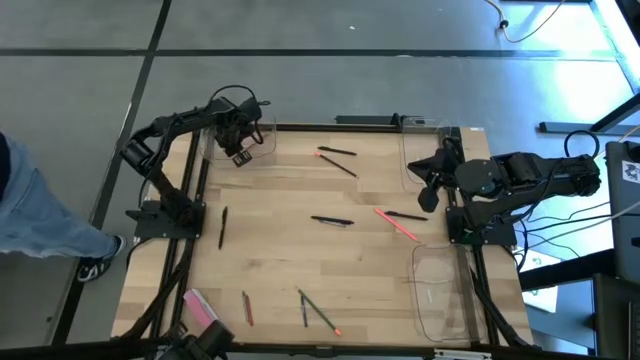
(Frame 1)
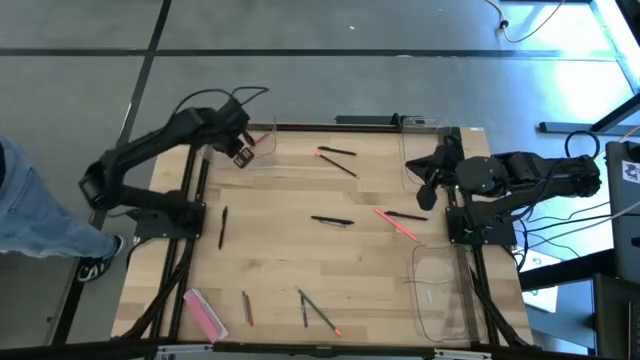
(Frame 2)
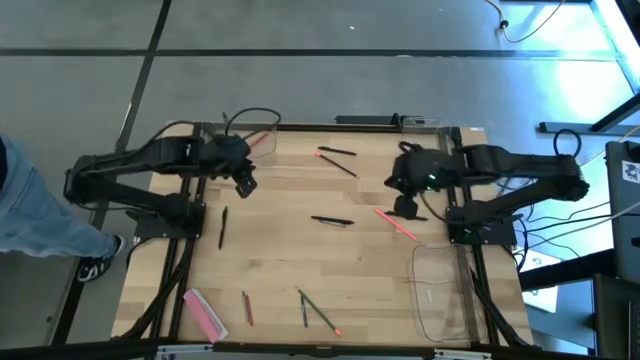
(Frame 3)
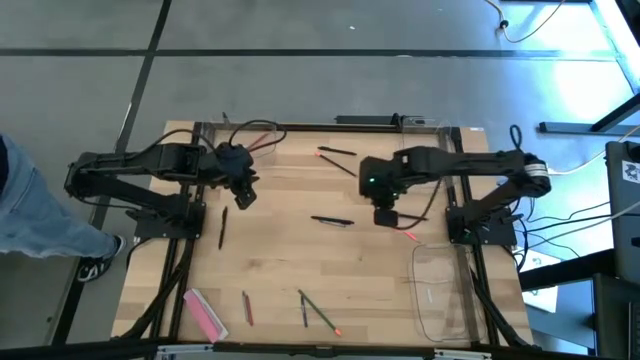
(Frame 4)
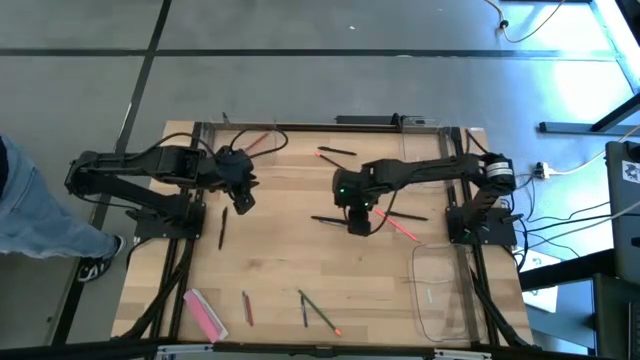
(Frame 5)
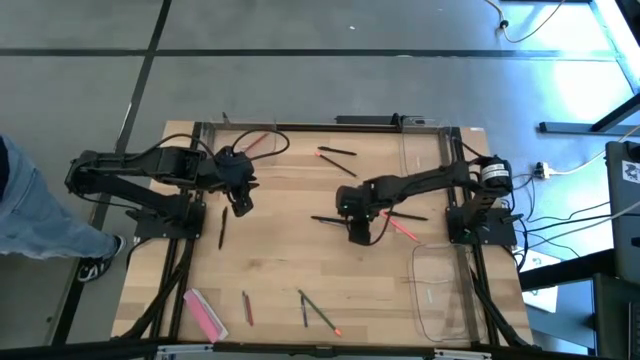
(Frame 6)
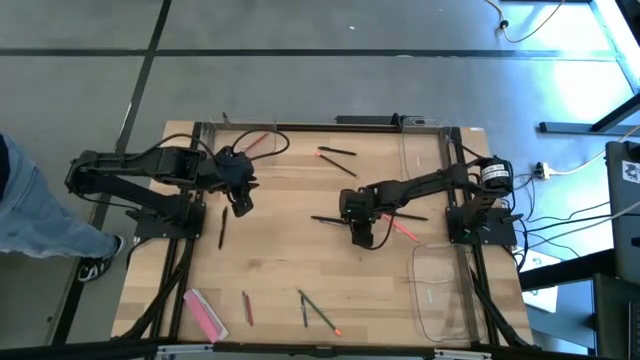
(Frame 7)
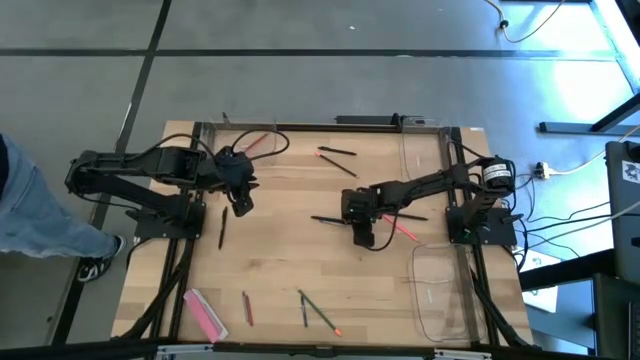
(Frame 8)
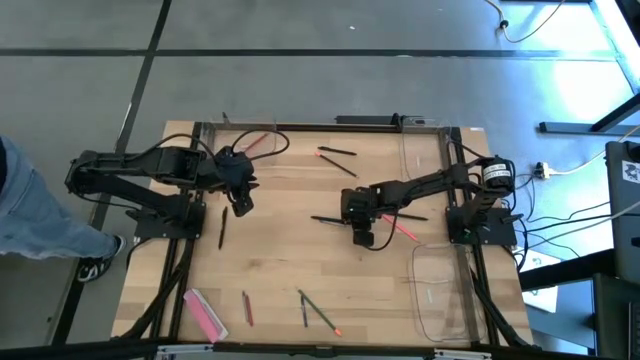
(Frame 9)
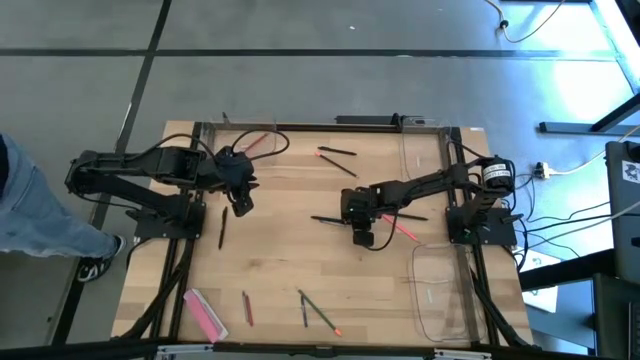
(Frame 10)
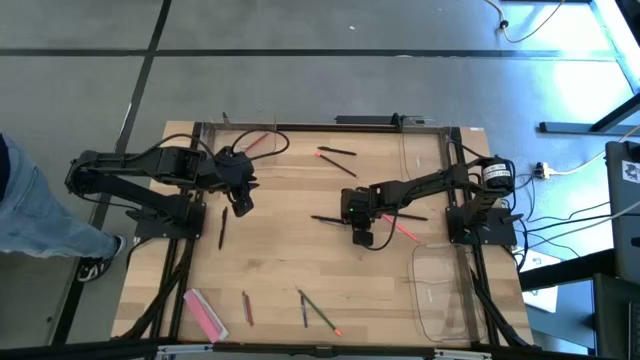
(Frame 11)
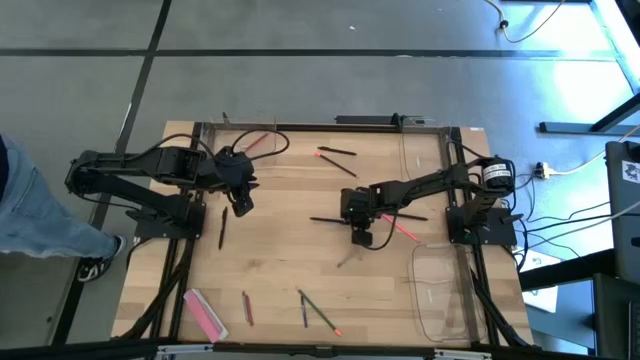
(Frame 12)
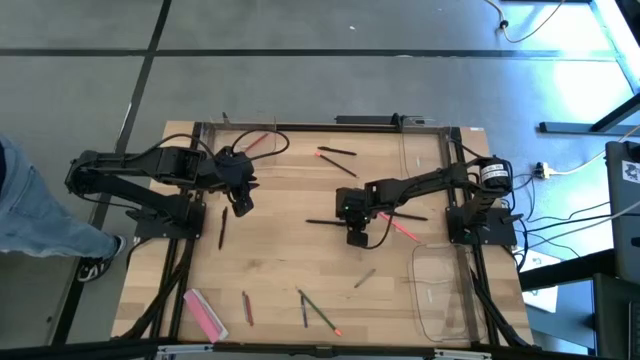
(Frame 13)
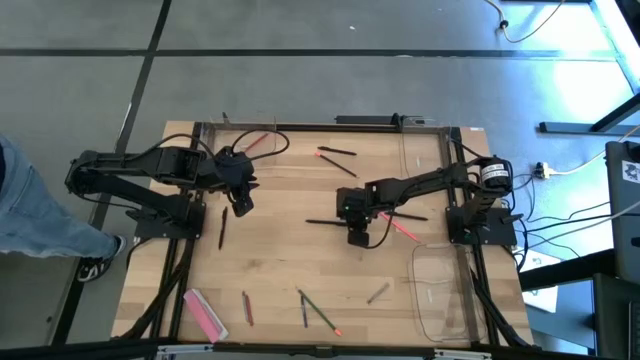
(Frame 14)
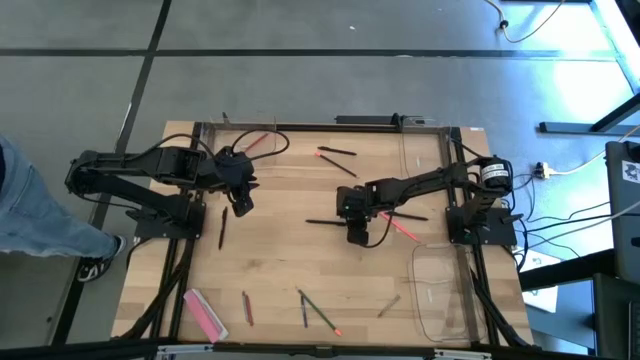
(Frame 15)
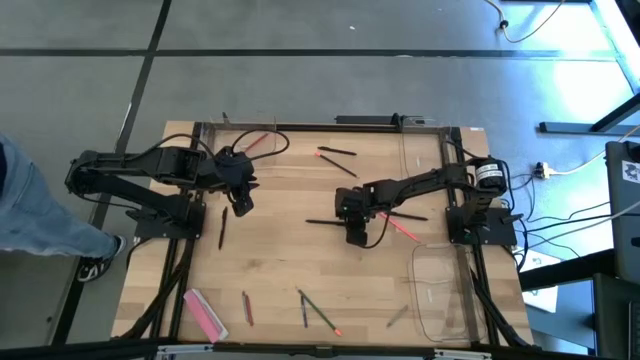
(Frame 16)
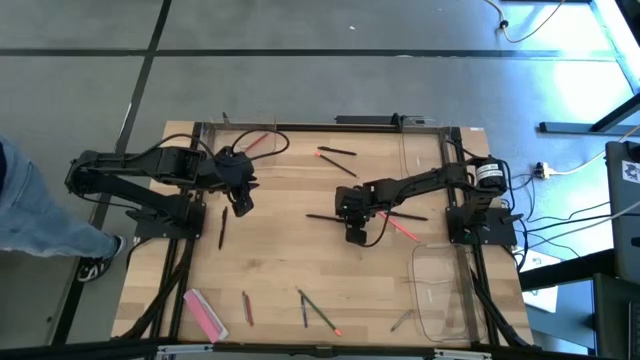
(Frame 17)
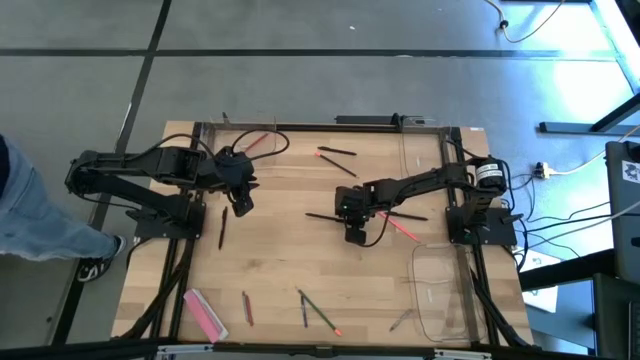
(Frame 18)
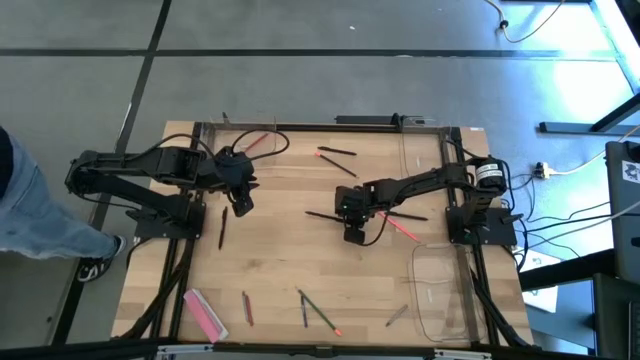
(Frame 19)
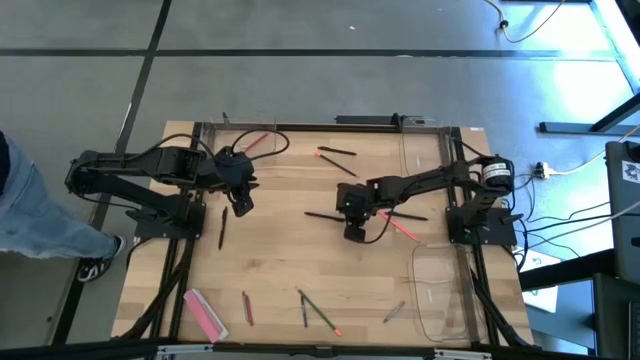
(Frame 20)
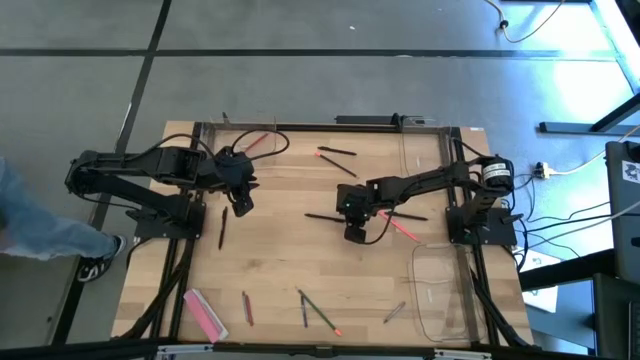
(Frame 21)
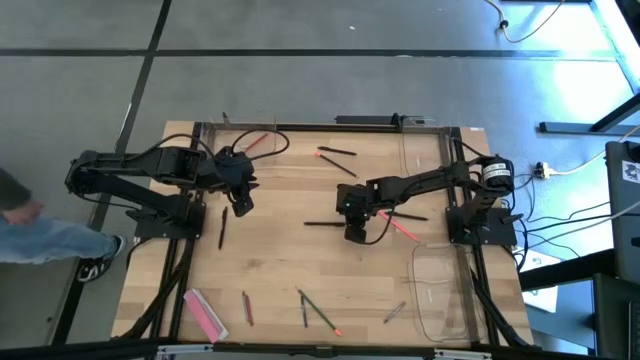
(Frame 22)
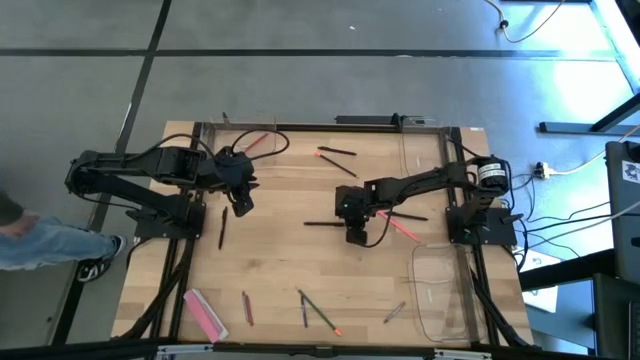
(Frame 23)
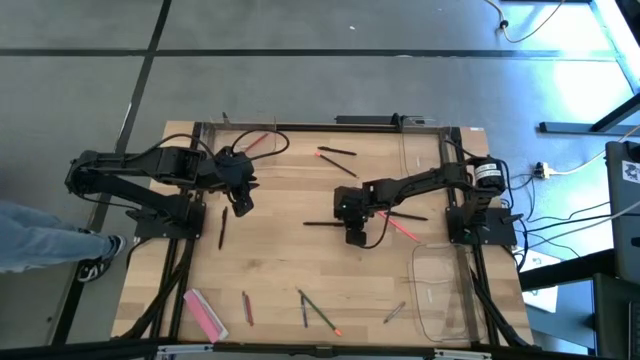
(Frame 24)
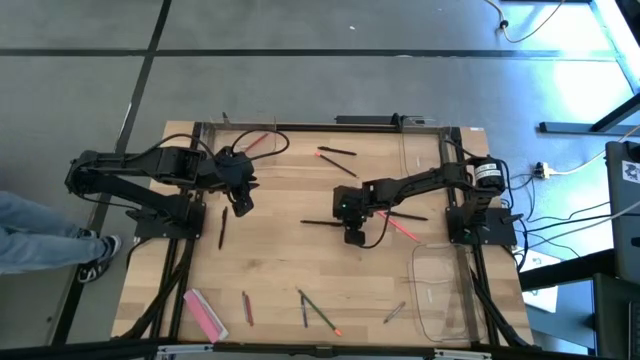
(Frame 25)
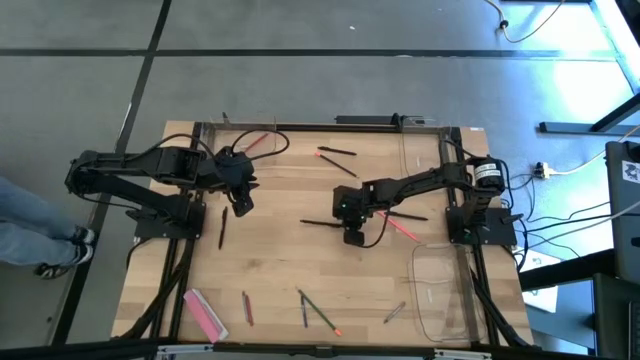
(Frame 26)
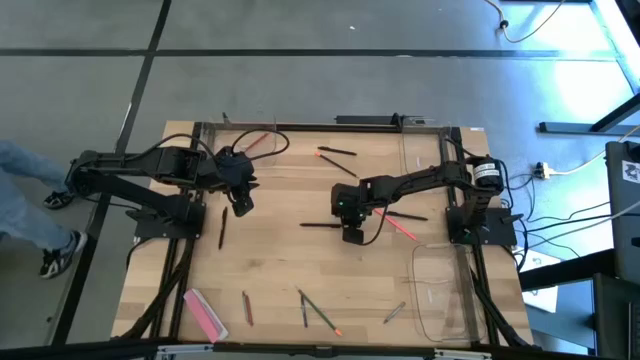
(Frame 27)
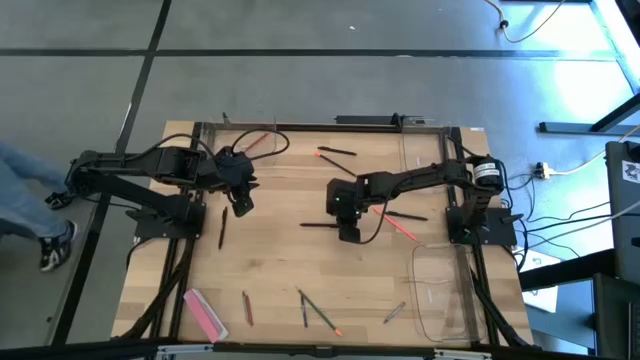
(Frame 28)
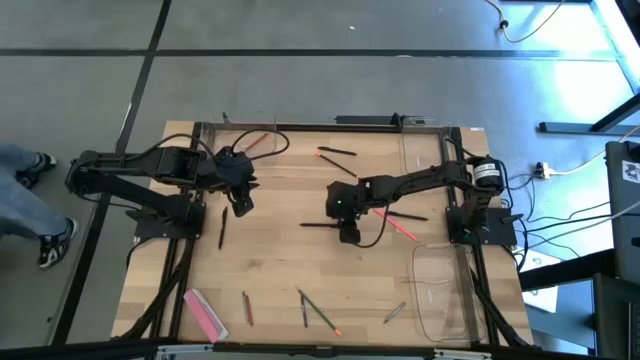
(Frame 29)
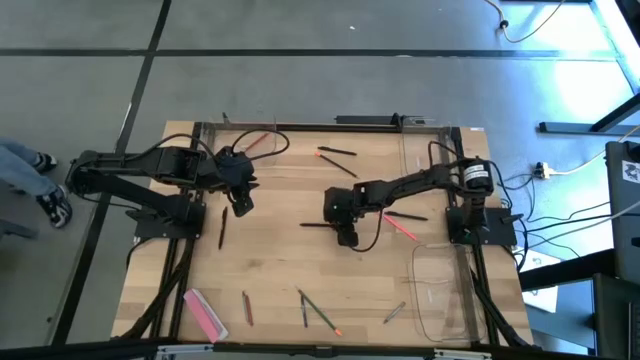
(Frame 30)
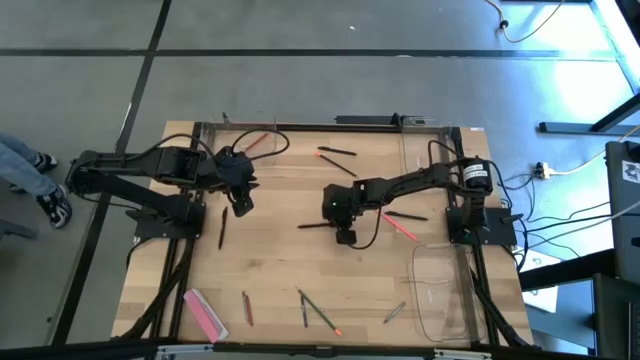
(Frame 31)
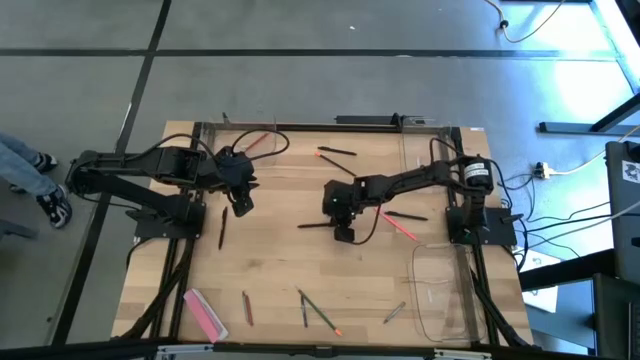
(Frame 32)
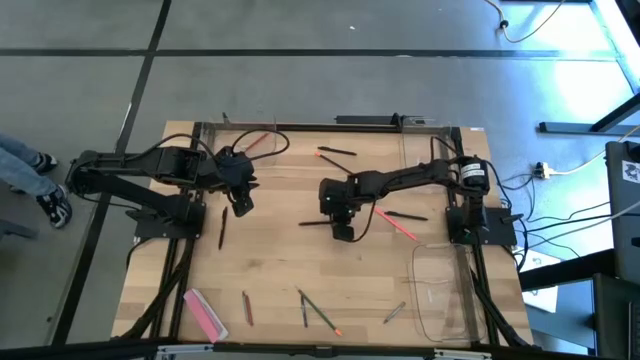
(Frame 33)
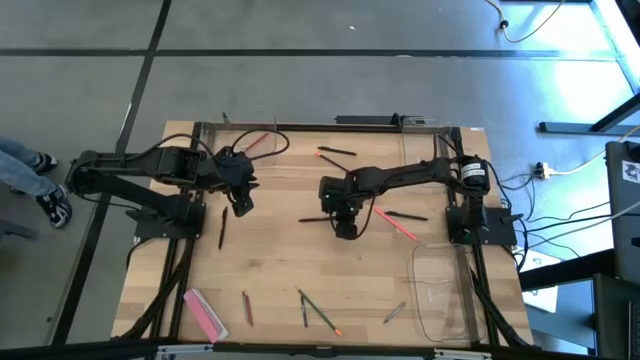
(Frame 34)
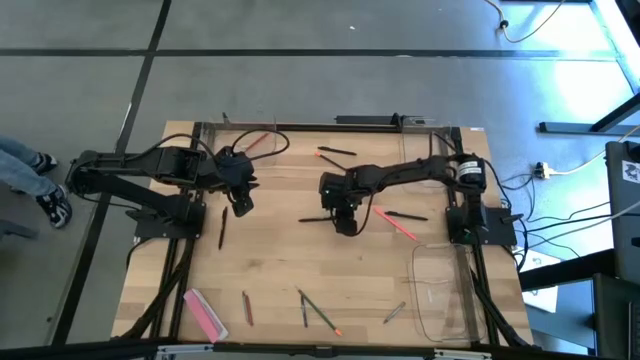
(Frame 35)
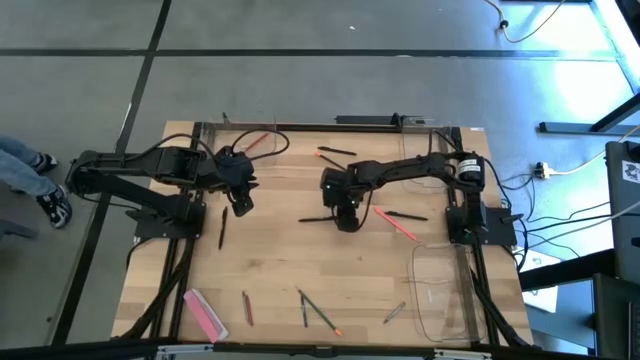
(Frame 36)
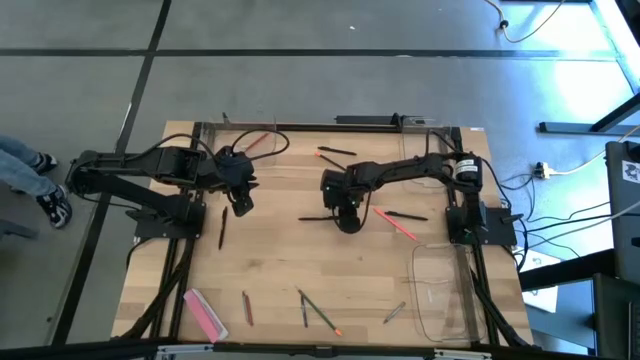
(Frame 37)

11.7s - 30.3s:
Task: Sort crayons/erasers/pens/pencils in bins
Put the black pen into the top right transparent bin
